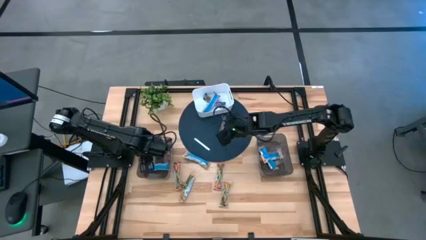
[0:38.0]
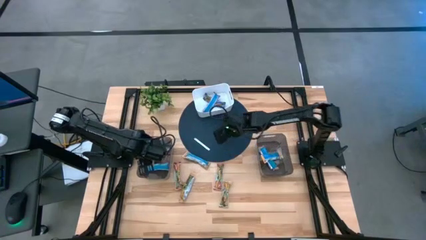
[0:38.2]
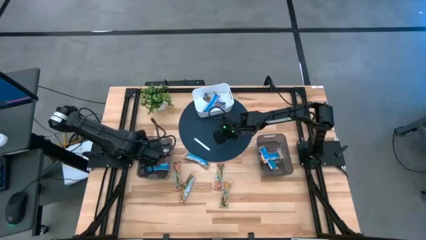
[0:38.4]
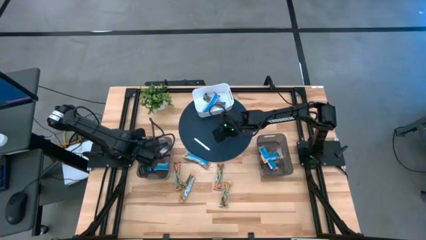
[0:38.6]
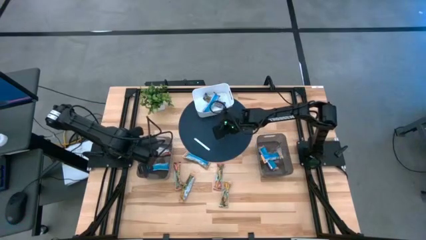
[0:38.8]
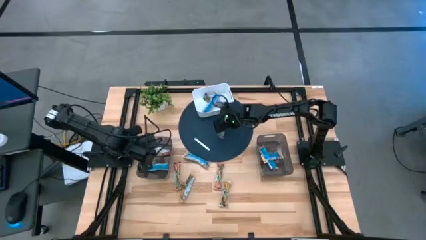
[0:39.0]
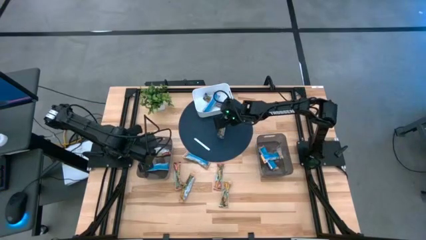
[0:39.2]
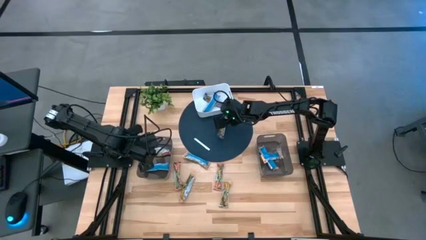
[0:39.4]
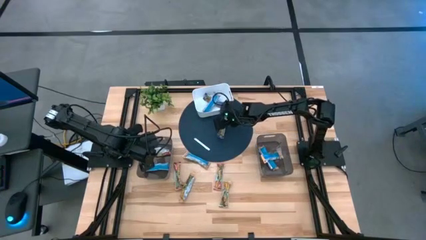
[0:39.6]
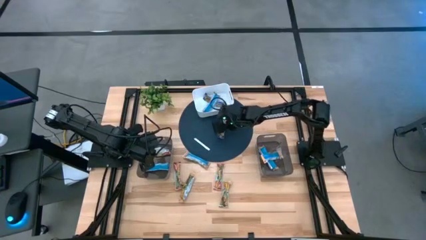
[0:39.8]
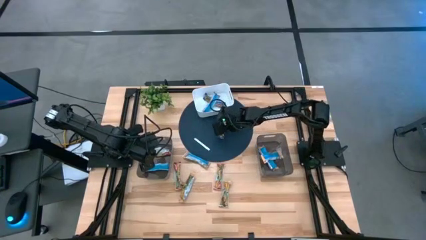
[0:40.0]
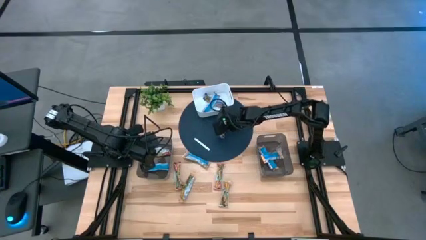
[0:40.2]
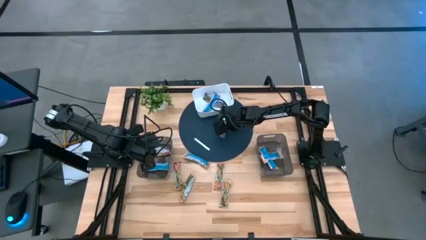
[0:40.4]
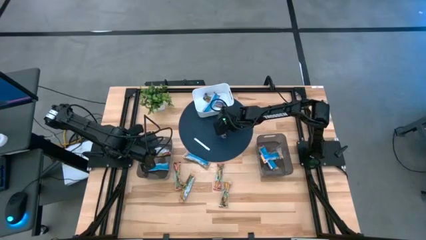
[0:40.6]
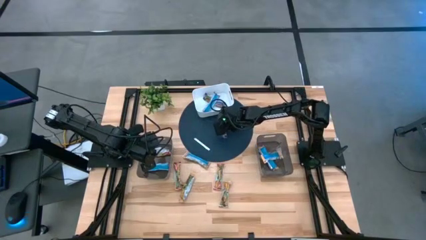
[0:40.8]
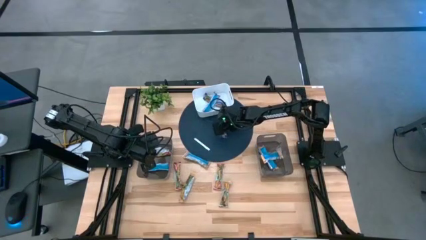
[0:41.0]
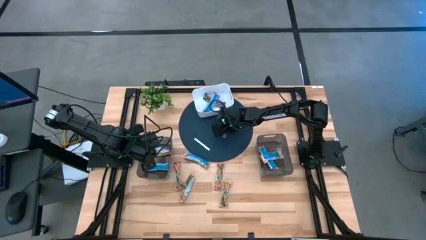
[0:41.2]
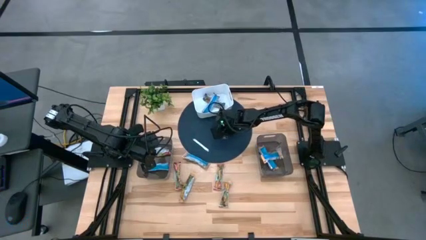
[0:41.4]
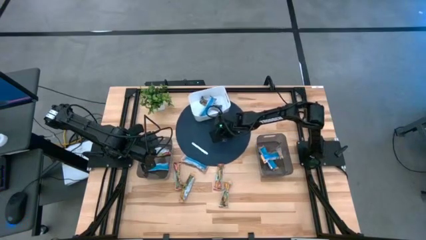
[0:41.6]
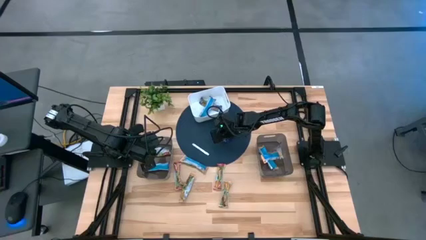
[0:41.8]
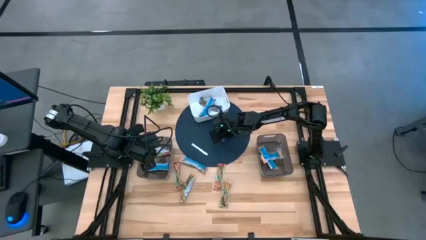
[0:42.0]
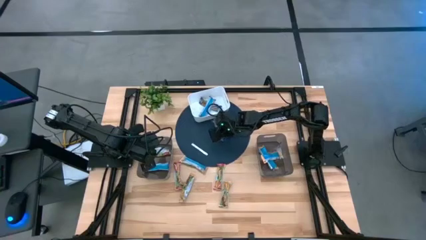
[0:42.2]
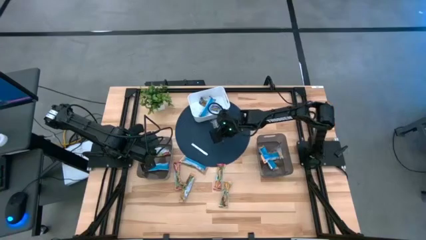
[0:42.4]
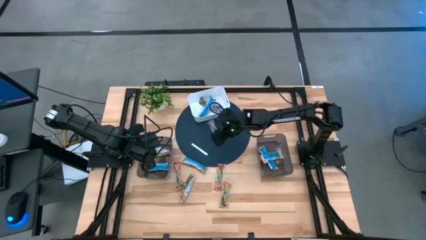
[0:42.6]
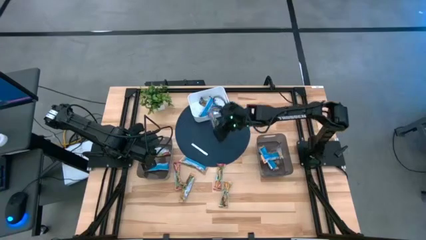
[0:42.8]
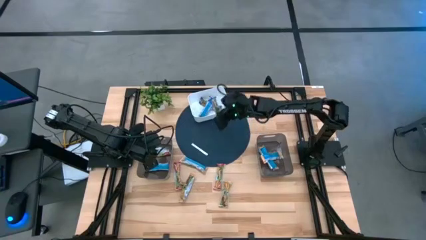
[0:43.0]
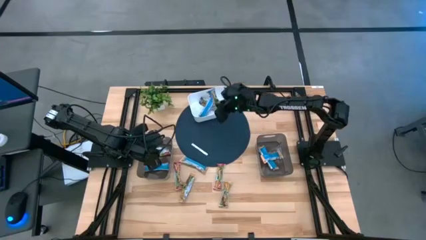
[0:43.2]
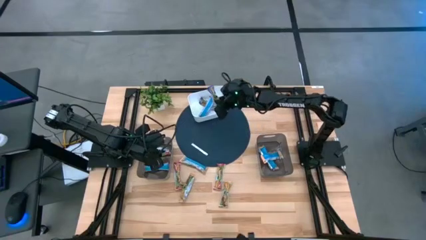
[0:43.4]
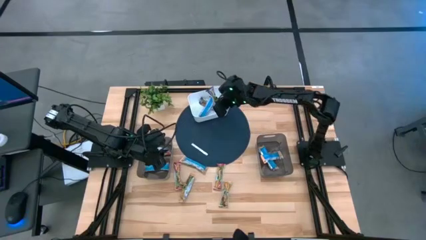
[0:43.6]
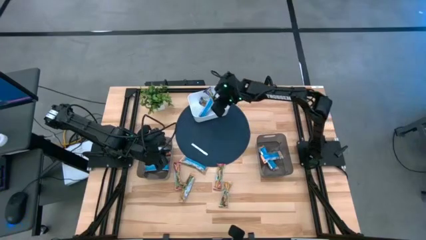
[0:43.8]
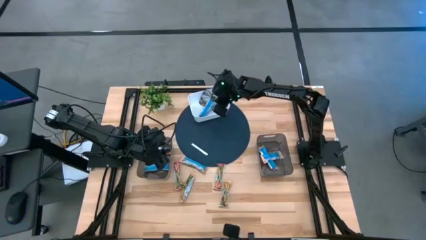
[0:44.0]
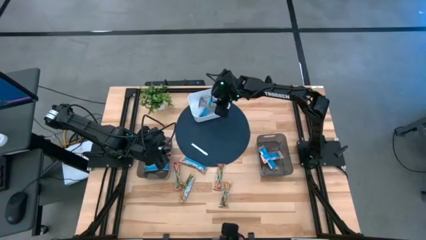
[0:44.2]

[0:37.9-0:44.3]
Task: Pick and place Granola Bars by type
Put the blue granola bar into the white bin

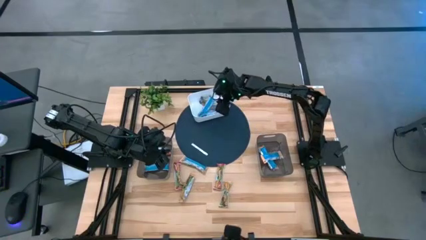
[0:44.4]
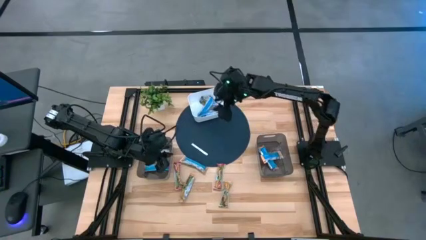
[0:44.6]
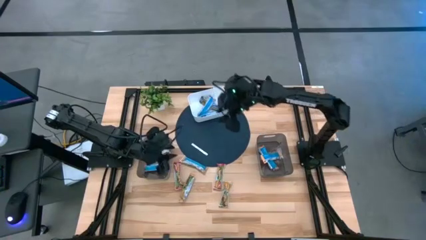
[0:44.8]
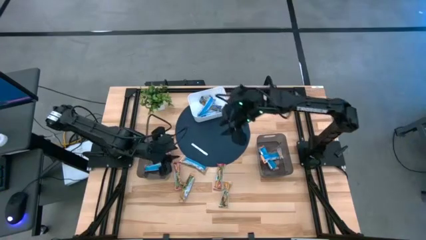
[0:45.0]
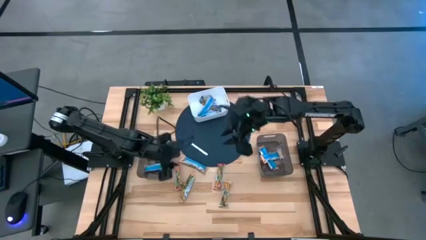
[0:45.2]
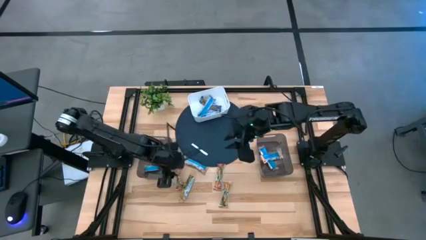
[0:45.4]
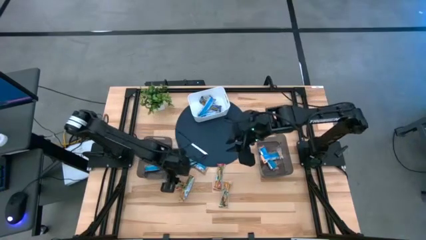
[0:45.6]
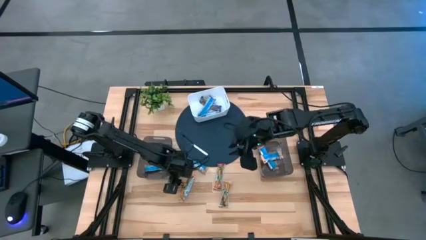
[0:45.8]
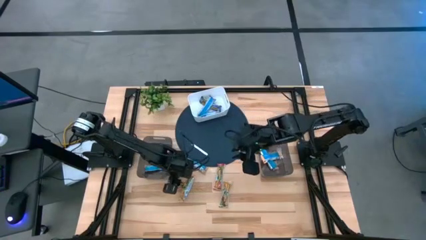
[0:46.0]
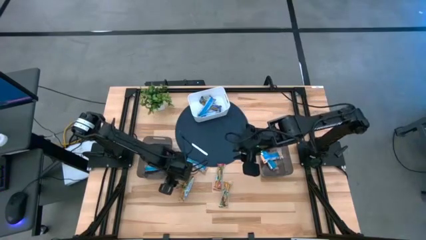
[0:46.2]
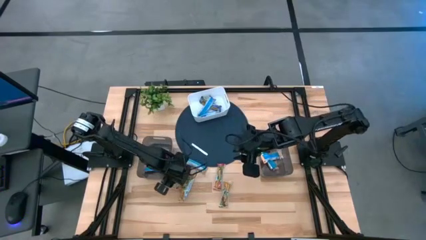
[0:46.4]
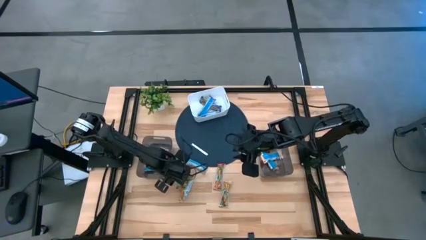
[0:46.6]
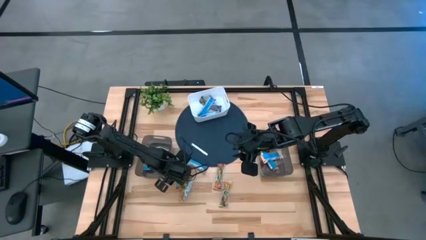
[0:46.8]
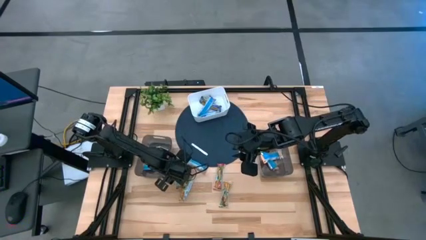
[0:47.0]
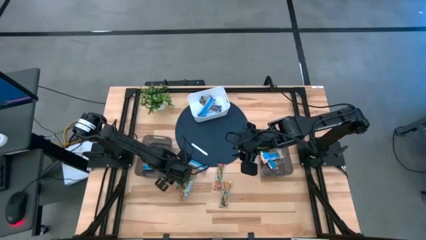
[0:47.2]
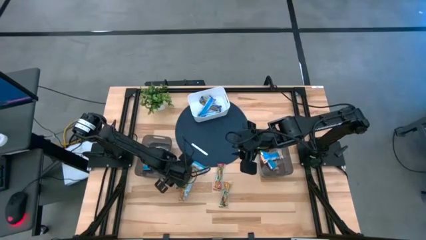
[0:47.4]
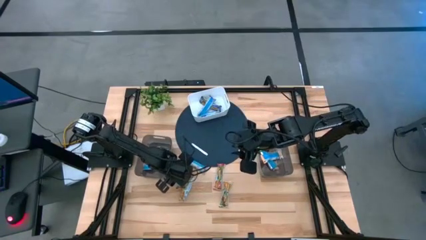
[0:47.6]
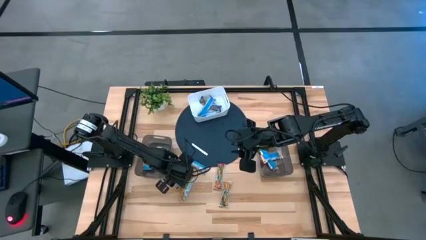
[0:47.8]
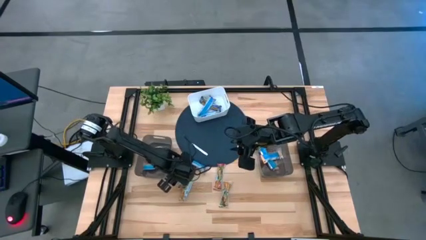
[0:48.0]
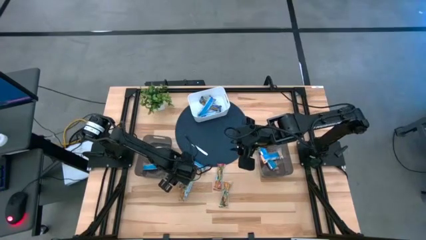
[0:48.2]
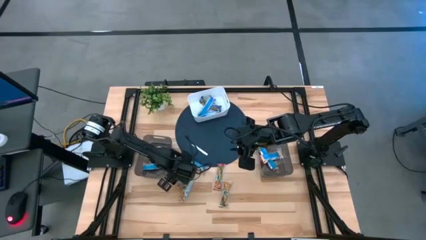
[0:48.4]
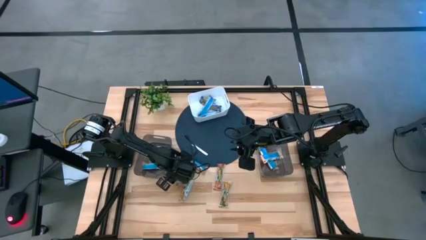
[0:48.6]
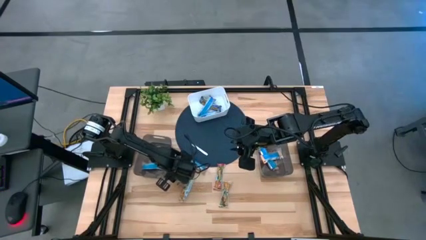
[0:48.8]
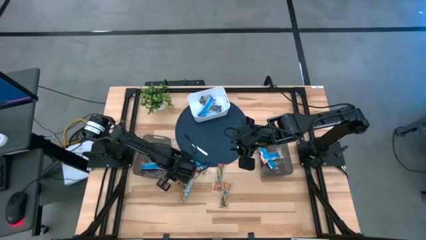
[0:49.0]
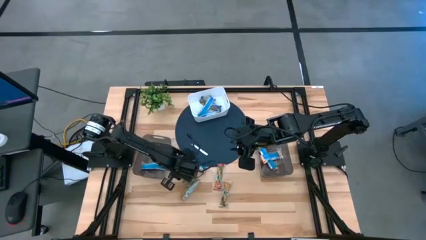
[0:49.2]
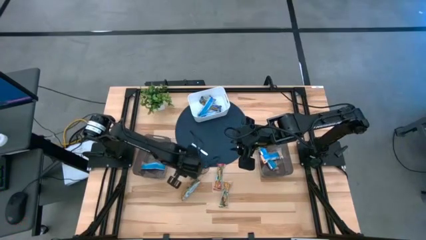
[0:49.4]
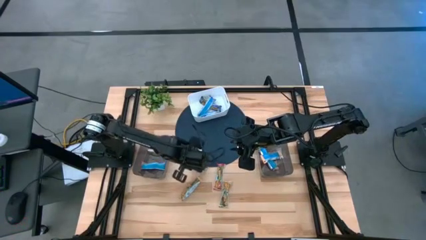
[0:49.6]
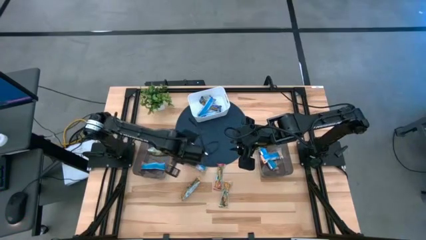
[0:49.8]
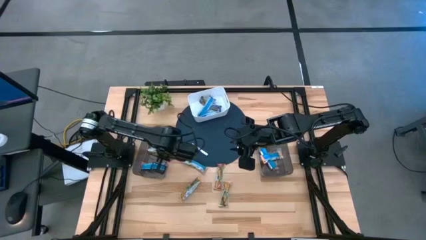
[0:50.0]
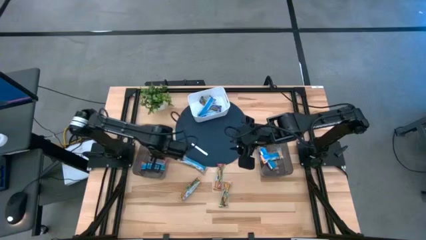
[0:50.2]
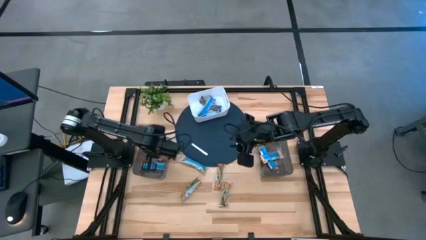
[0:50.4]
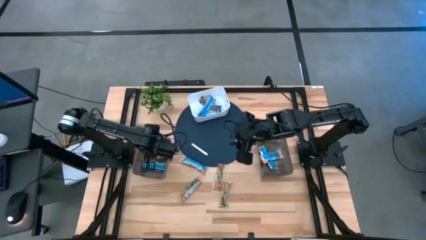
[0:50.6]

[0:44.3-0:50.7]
Put the red granola bar into the left black bin

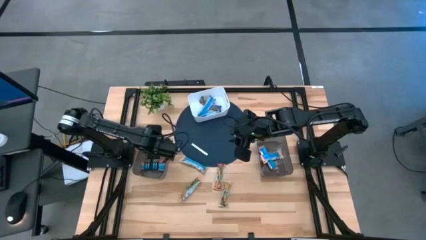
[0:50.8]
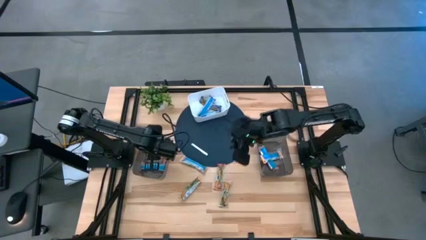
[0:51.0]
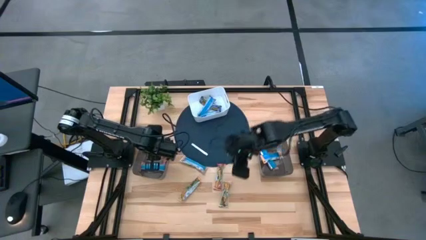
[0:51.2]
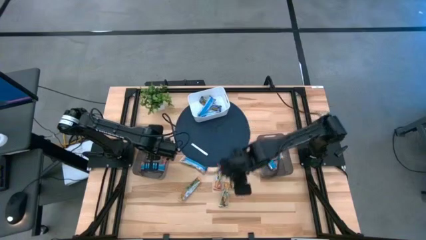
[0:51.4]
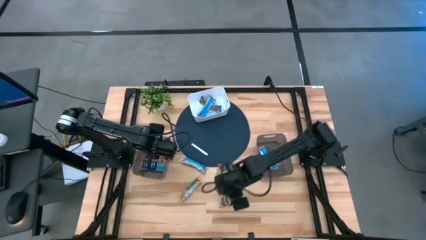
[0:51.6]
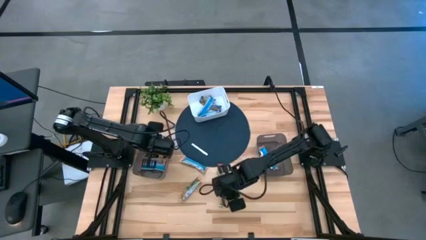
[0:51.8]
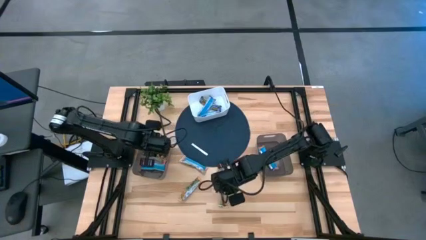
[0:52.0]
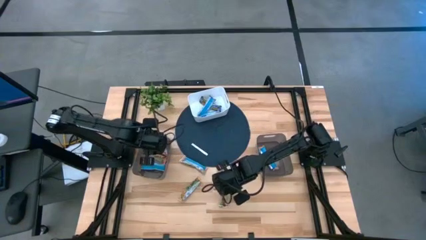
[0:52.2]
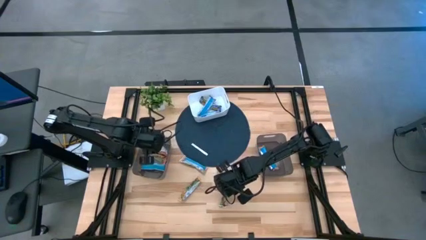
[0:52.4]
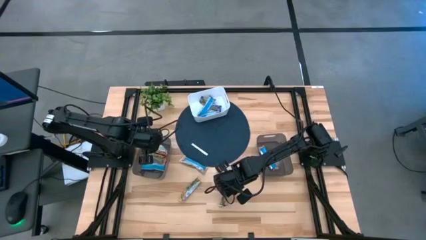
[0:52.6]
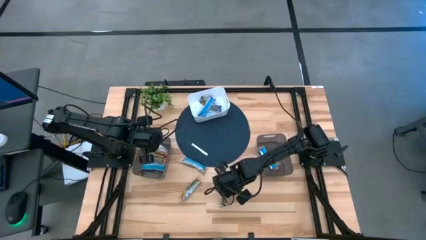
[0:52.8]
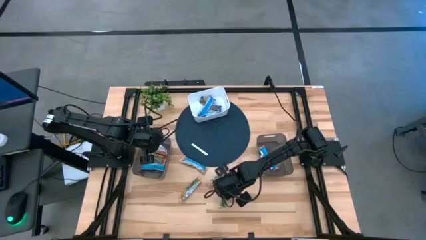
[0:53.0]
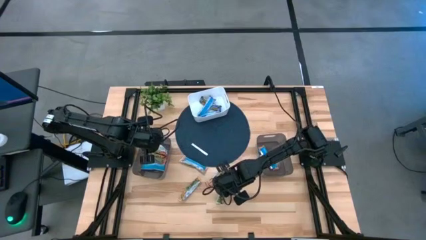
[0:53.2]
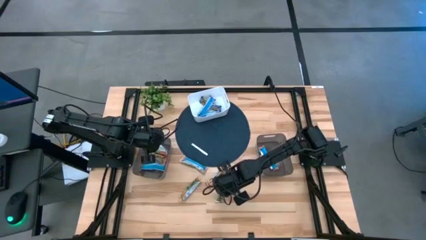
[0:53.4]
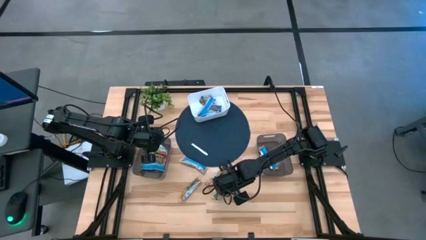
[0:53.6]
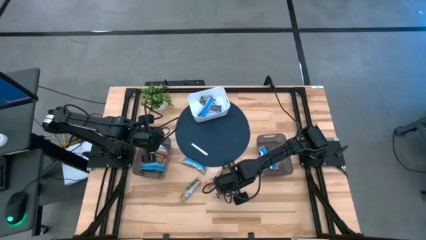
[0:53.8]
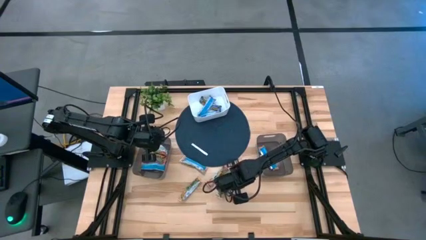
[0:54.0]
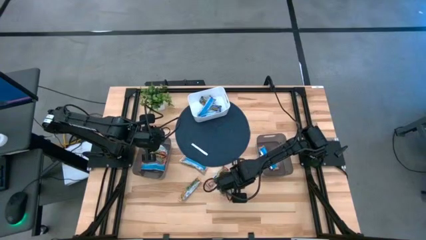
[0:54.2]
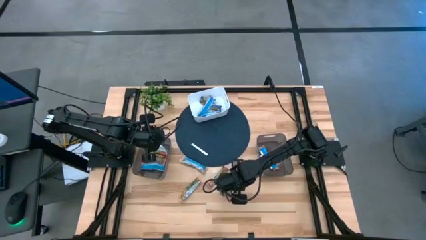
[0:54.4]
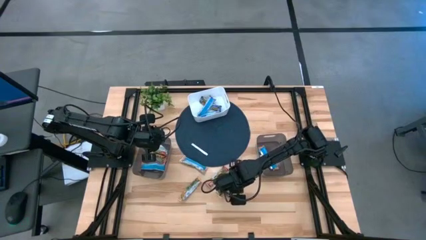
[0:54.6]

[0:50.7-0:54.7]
Put the yellow granola bar into the right black bin

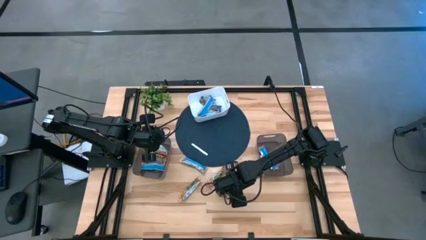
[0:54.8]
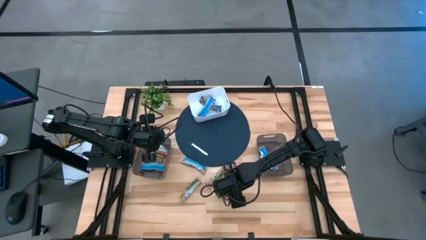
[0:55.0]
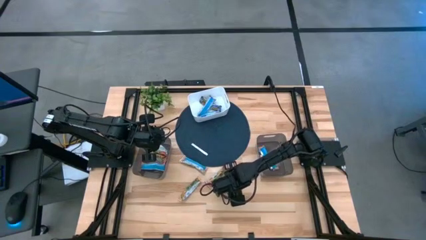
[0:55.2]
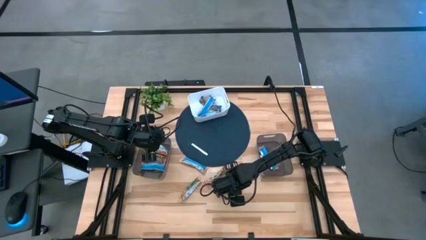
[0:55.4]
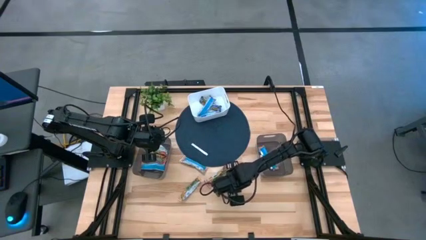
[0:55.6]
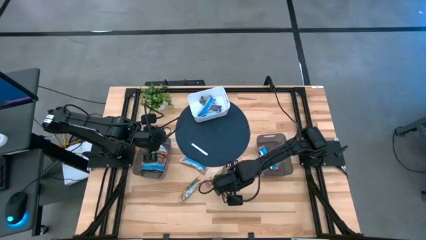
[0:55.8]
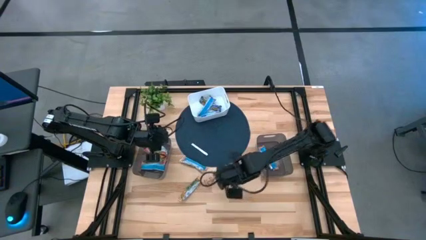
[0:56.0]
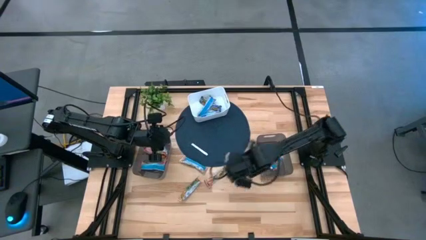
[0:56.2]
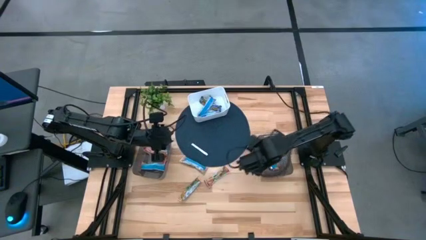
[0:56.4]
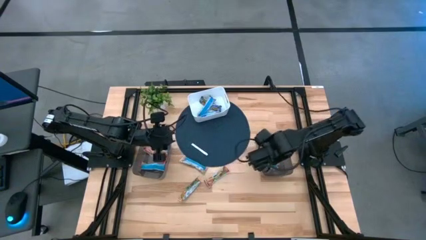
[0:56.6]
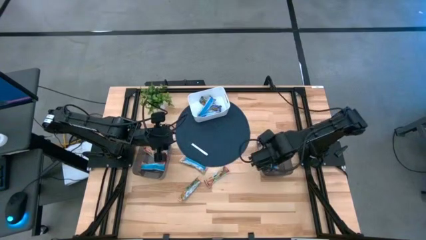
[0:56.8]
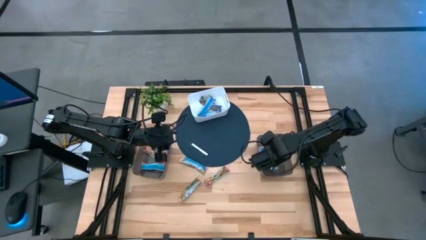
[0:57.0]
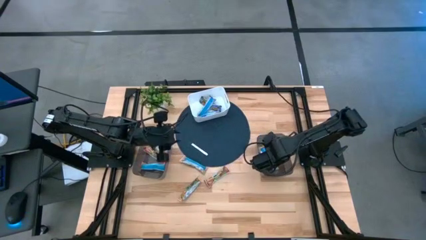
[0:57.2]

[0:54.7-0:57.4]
Put the yellow granola bar into the right black bin
